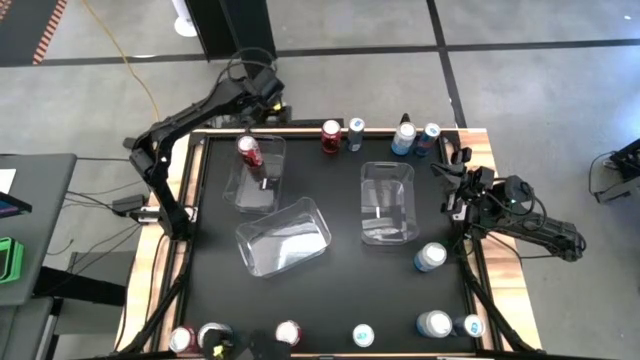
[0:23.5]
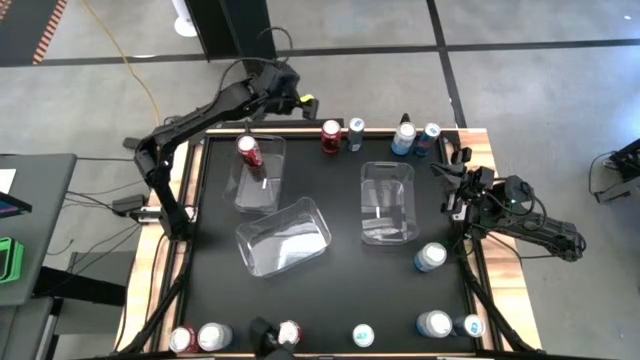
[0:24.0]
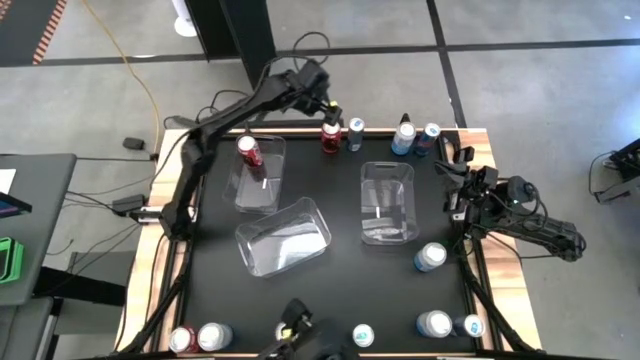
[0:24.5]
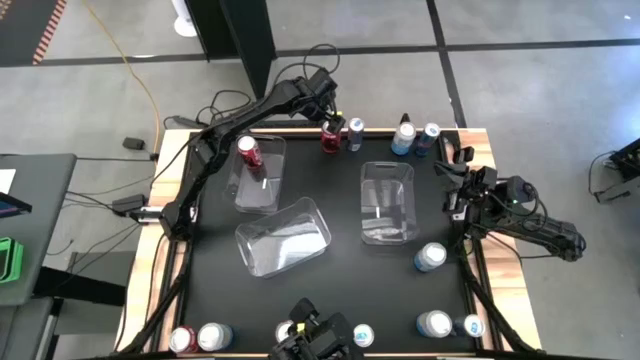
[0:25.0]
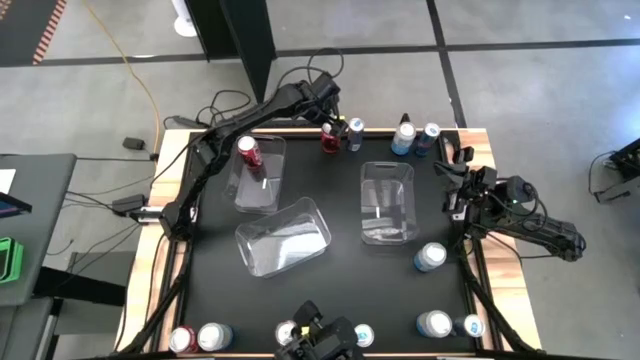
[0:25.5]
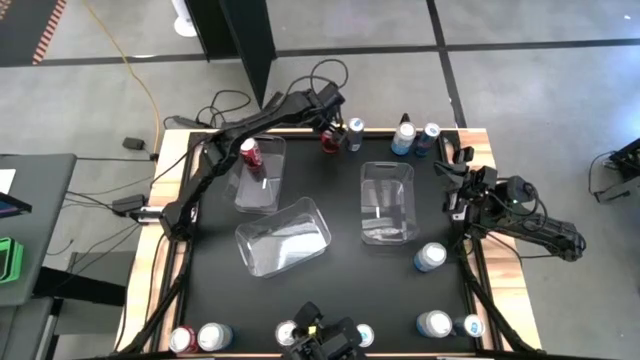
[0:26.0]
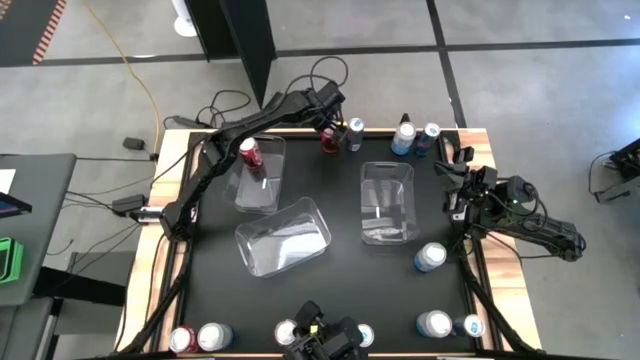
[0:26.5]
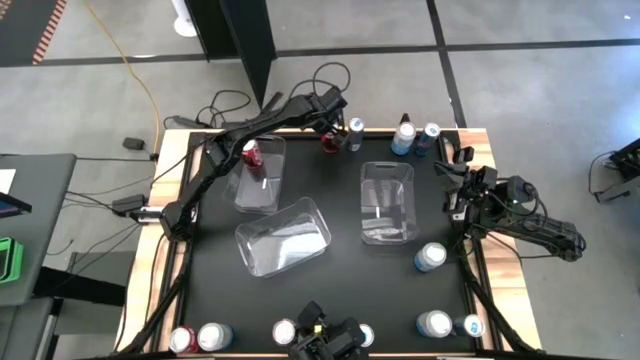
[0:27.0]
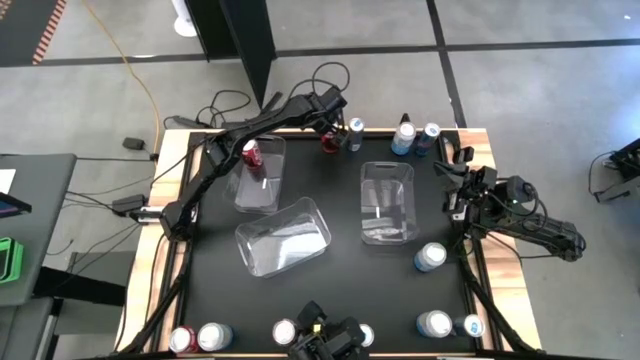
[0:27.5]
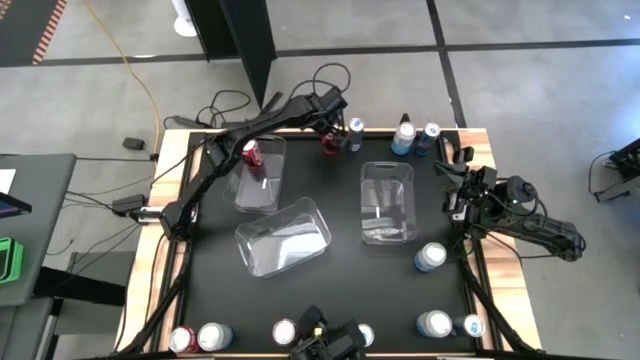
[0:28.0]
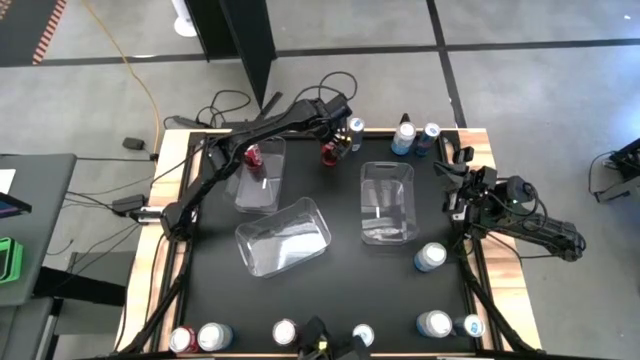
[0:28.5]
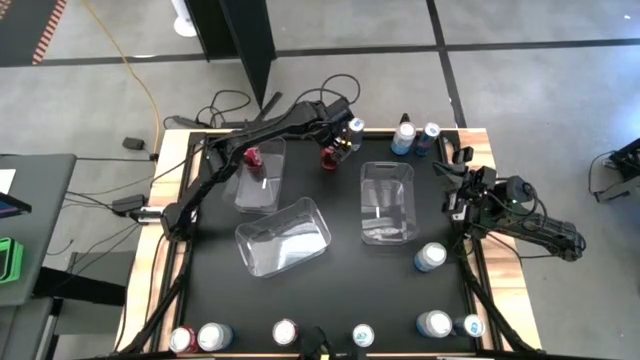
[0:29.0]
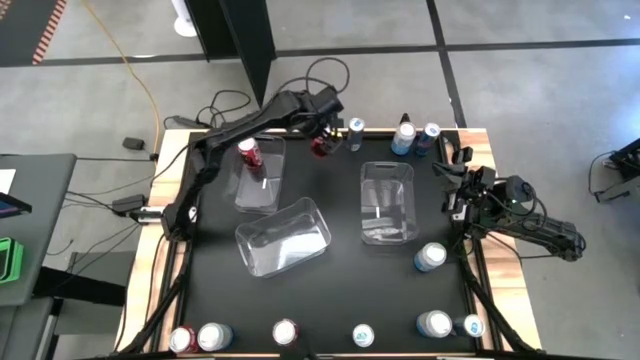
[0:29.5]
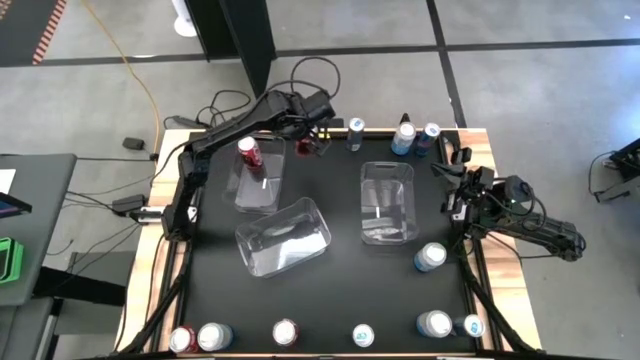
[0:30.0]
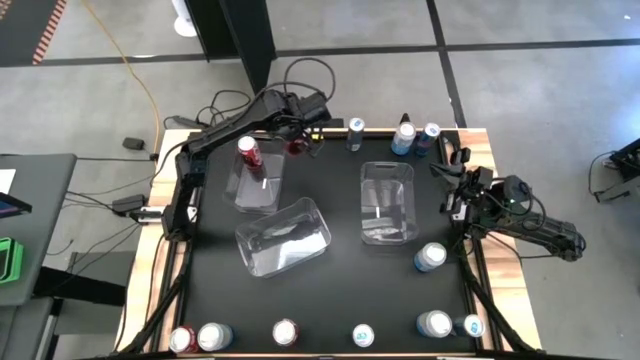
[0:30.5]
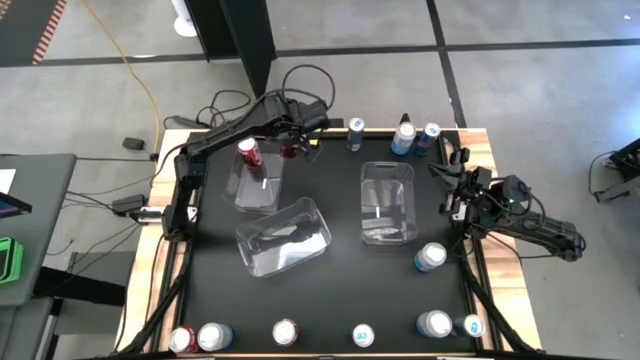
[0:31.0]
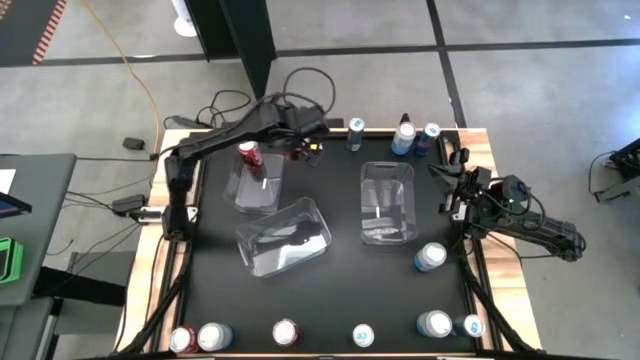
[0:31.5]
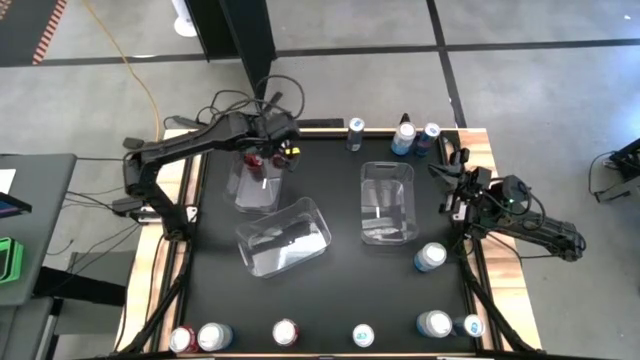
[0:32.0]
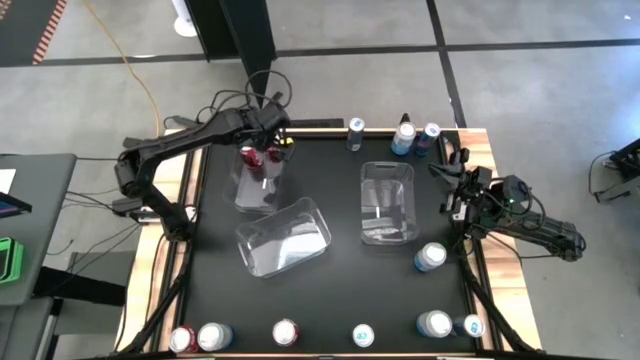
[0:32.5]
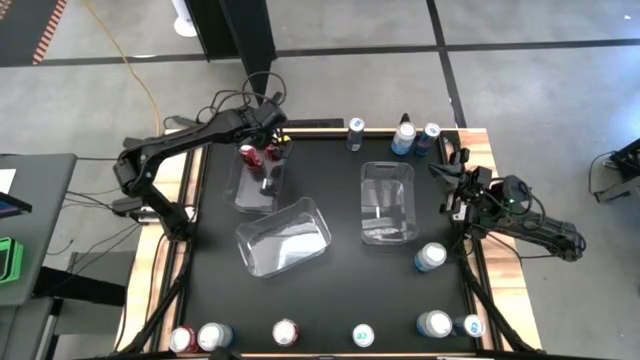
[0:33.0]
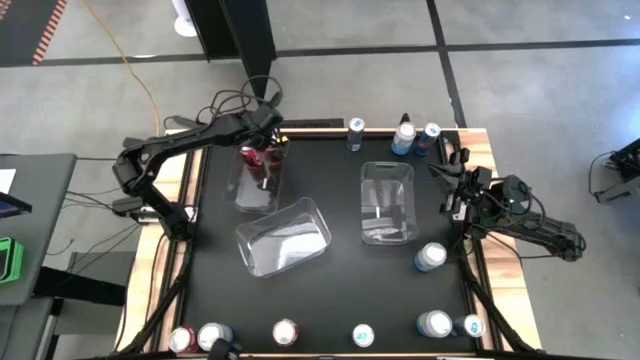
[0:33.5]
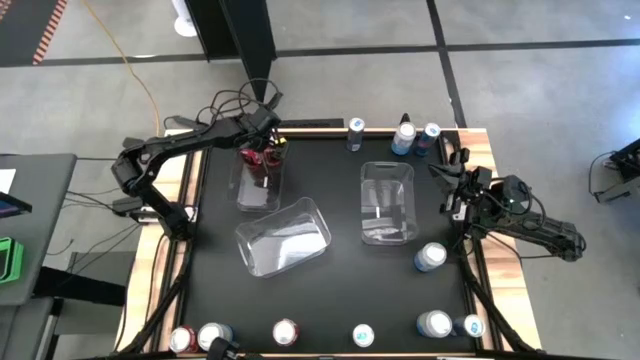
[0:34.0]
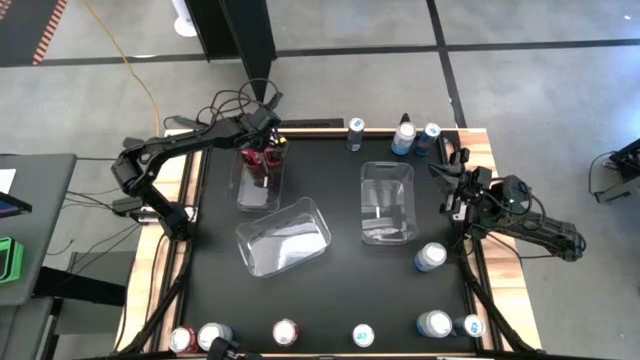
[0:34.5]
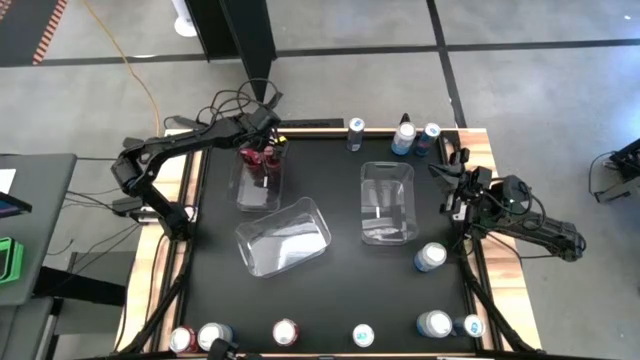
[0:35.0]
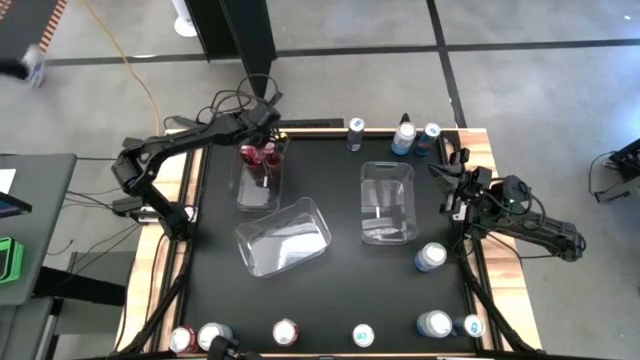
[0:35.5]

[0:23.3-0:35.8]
Task: Sort soda cans
Put the top red soda can into the left transparent bin
